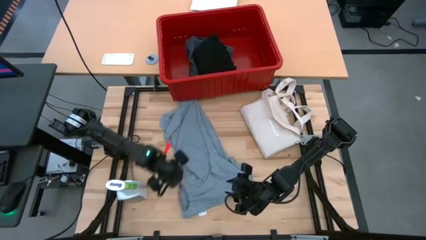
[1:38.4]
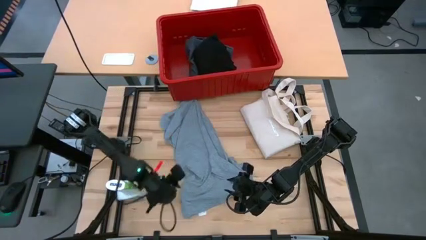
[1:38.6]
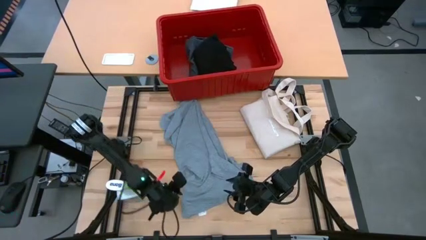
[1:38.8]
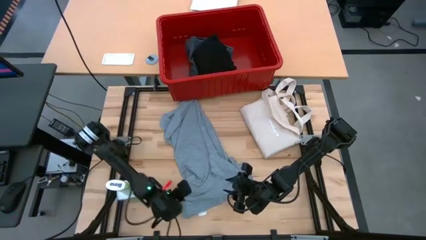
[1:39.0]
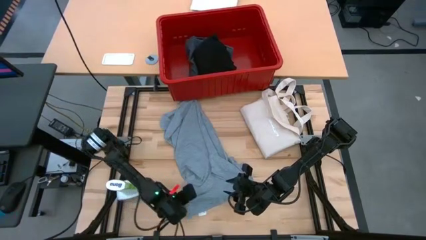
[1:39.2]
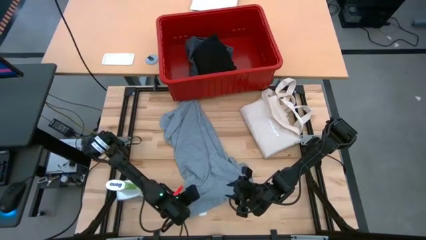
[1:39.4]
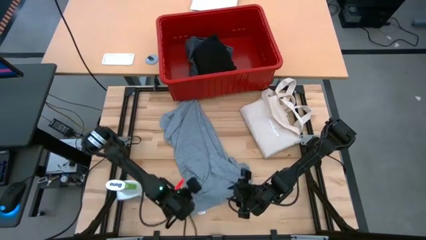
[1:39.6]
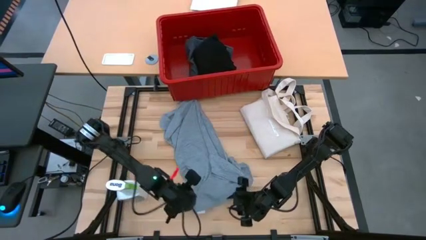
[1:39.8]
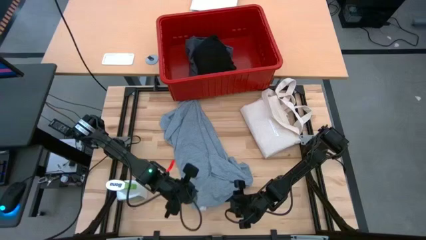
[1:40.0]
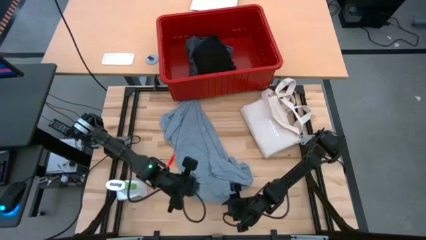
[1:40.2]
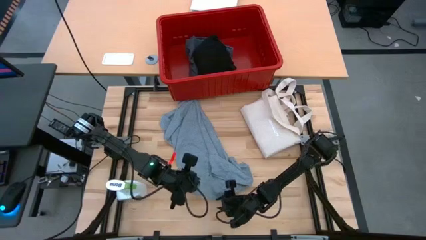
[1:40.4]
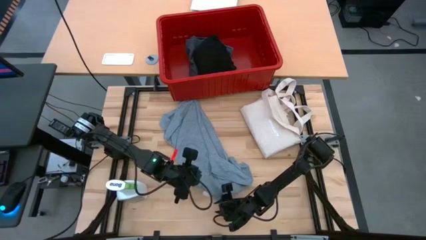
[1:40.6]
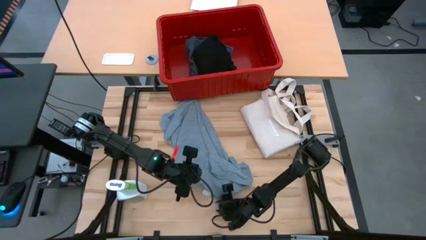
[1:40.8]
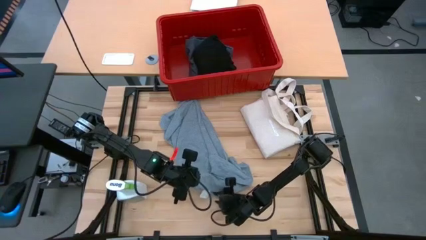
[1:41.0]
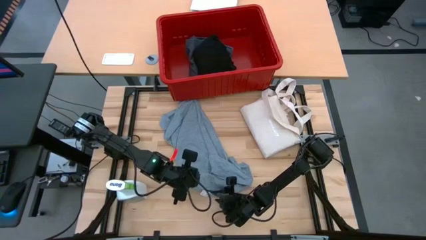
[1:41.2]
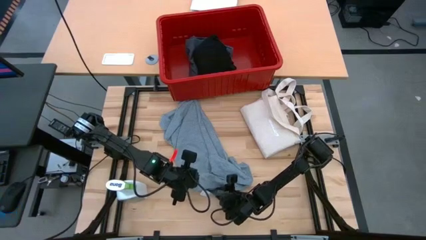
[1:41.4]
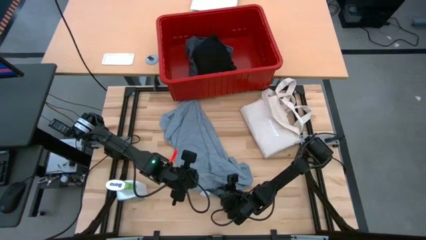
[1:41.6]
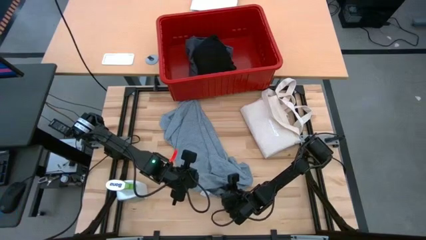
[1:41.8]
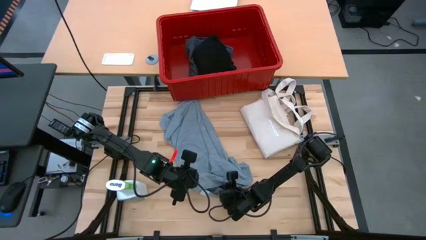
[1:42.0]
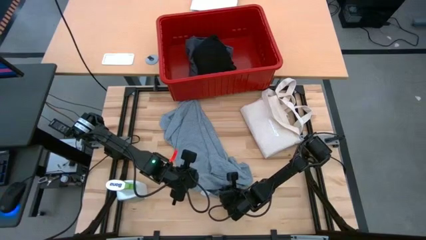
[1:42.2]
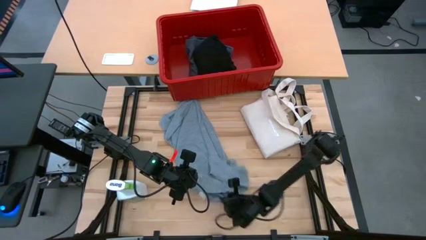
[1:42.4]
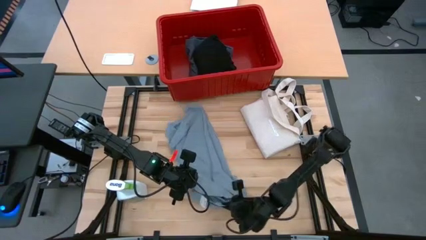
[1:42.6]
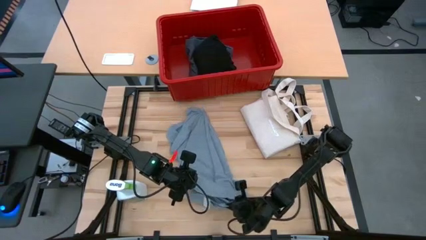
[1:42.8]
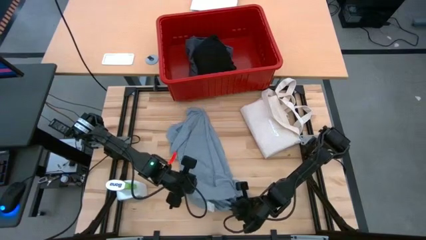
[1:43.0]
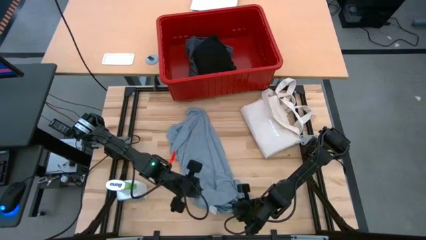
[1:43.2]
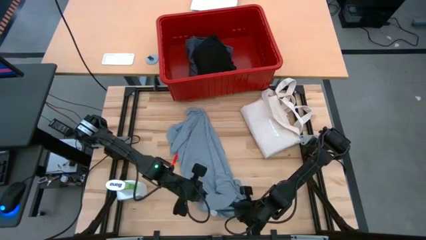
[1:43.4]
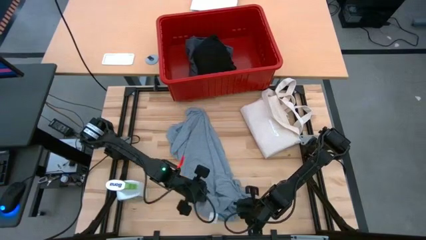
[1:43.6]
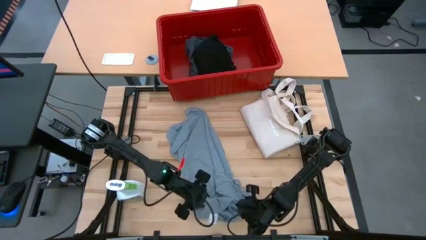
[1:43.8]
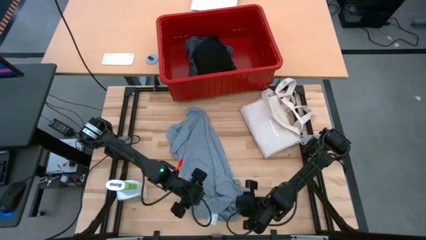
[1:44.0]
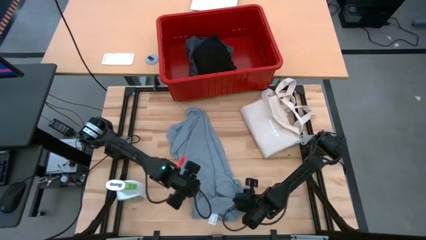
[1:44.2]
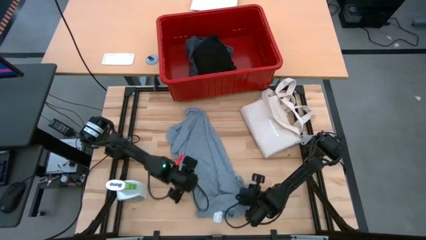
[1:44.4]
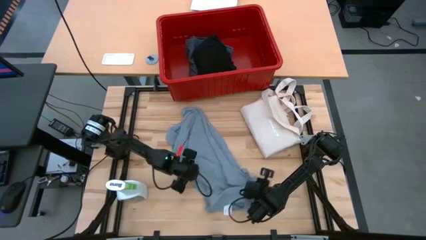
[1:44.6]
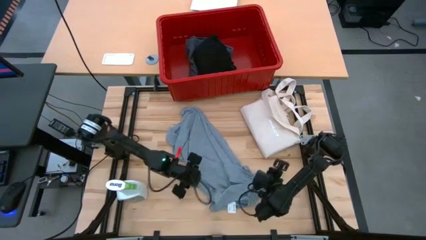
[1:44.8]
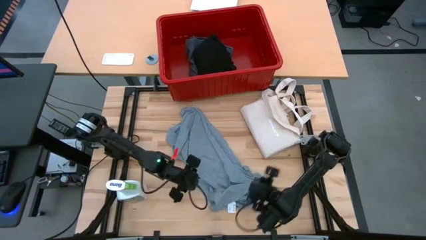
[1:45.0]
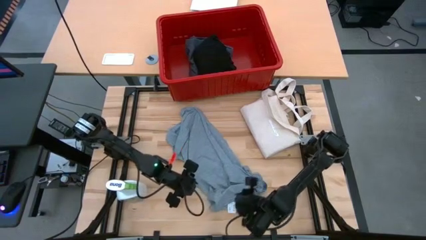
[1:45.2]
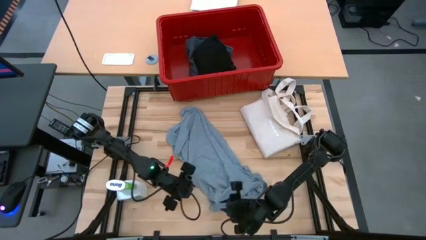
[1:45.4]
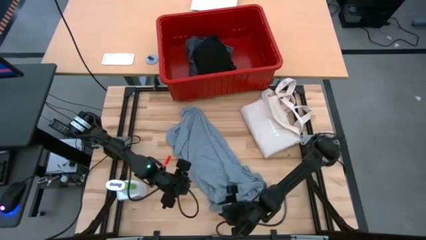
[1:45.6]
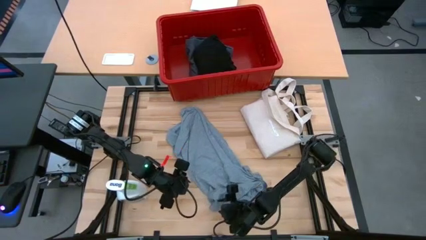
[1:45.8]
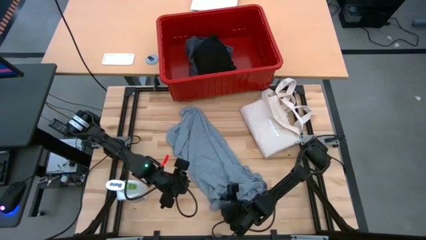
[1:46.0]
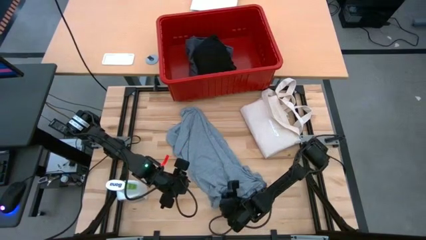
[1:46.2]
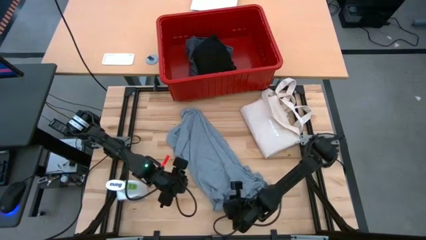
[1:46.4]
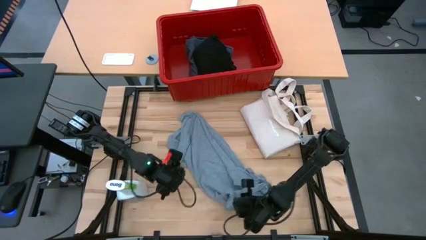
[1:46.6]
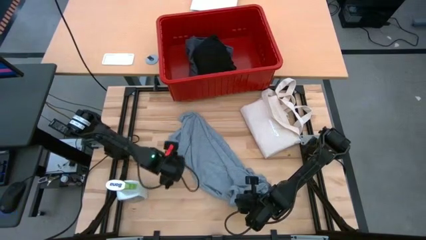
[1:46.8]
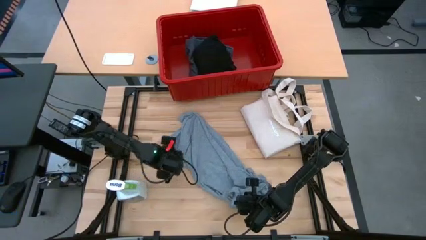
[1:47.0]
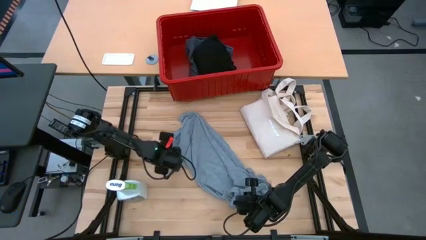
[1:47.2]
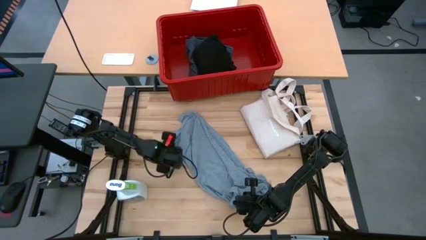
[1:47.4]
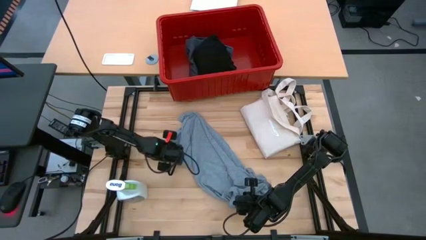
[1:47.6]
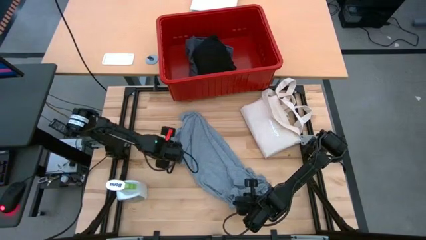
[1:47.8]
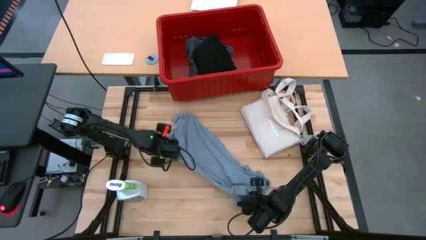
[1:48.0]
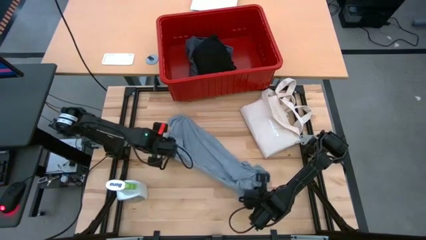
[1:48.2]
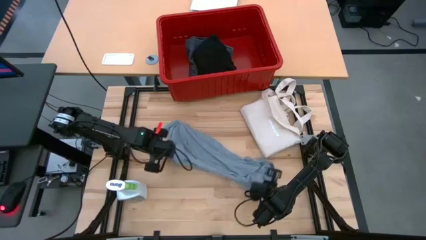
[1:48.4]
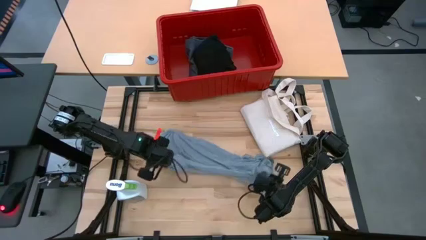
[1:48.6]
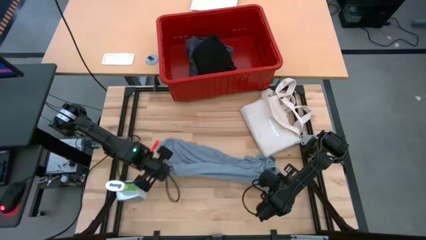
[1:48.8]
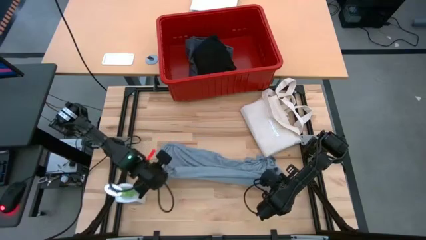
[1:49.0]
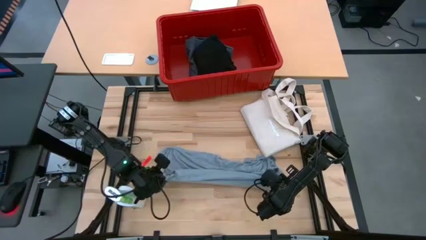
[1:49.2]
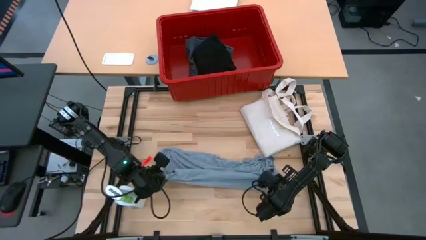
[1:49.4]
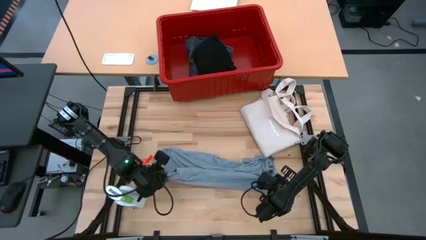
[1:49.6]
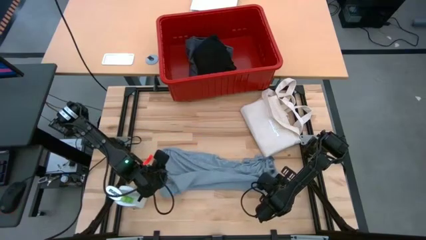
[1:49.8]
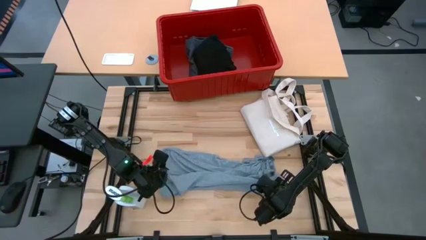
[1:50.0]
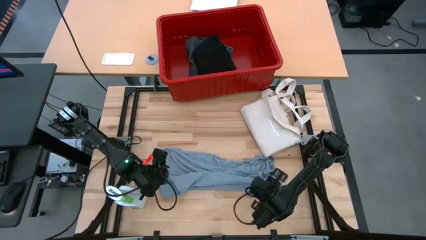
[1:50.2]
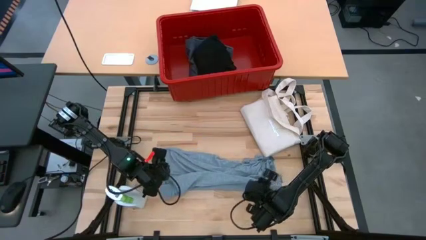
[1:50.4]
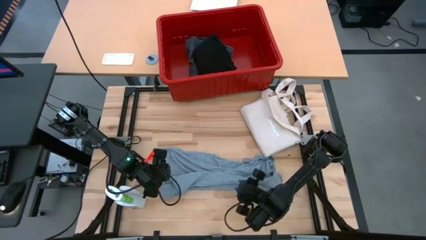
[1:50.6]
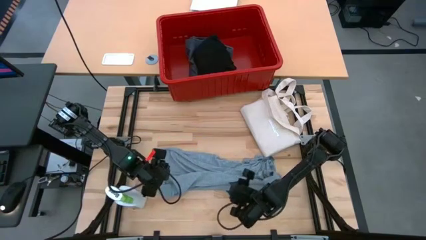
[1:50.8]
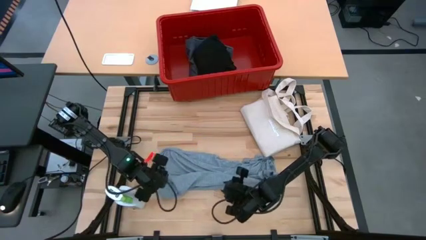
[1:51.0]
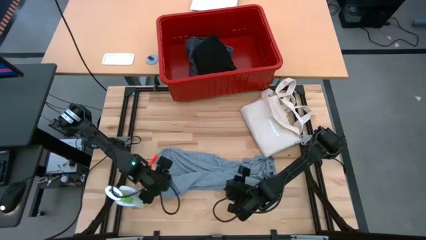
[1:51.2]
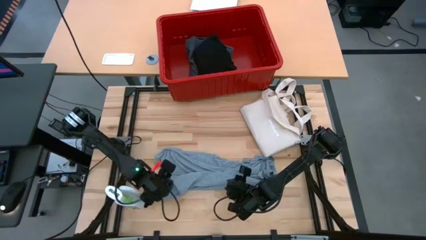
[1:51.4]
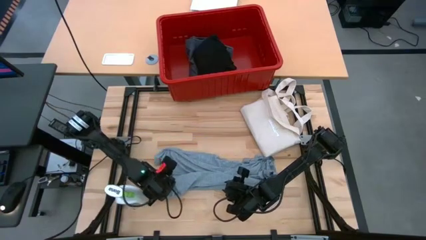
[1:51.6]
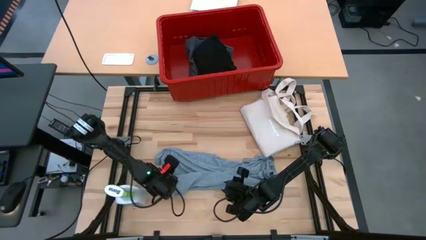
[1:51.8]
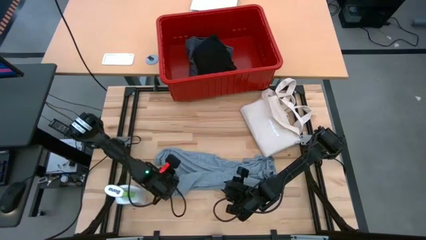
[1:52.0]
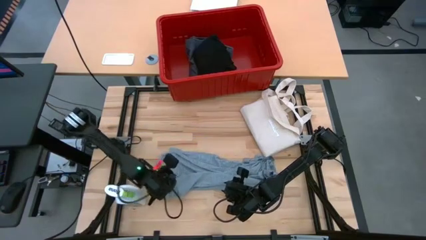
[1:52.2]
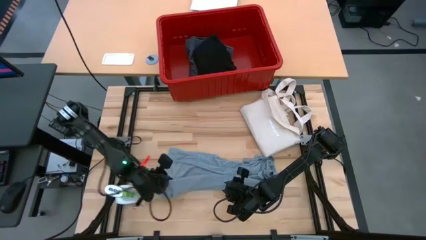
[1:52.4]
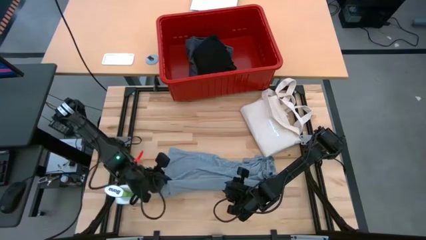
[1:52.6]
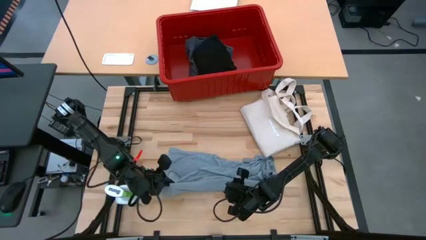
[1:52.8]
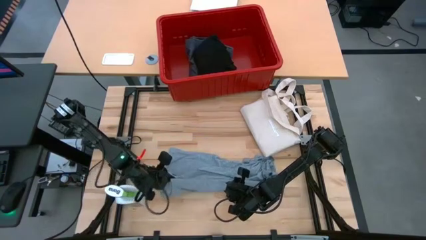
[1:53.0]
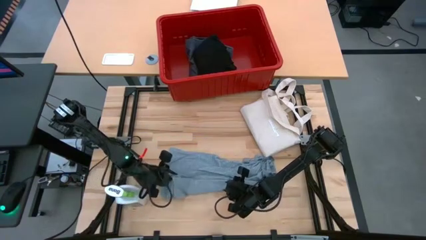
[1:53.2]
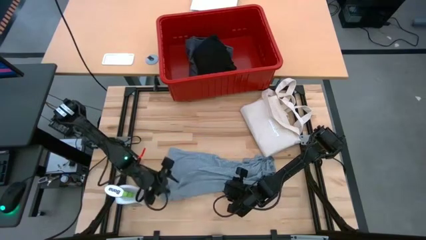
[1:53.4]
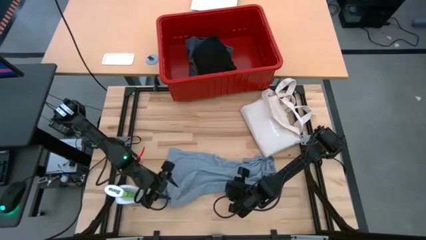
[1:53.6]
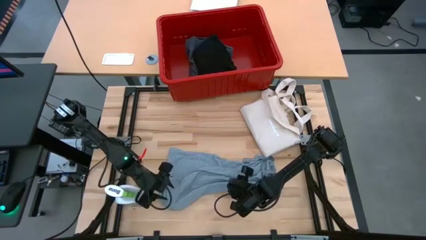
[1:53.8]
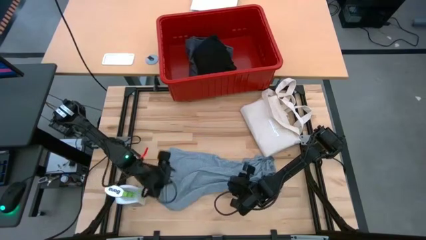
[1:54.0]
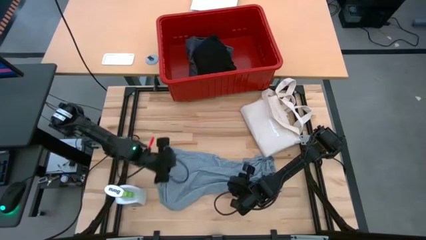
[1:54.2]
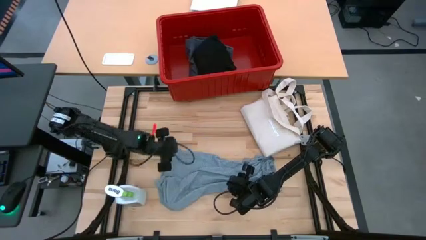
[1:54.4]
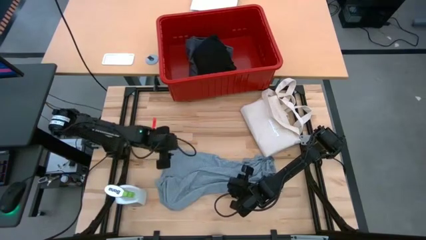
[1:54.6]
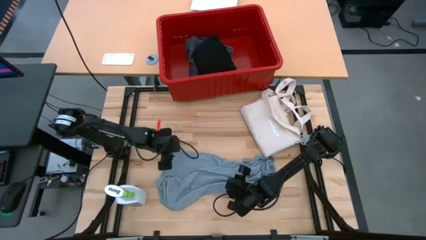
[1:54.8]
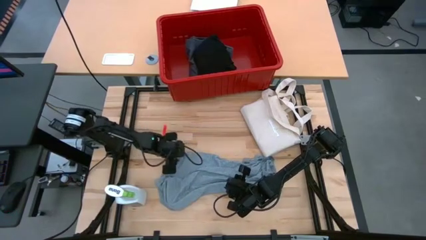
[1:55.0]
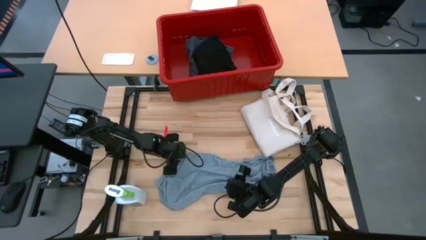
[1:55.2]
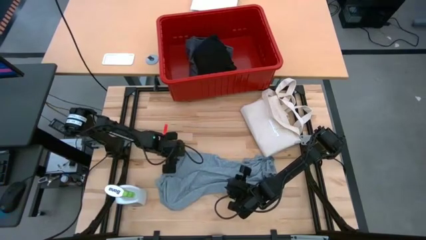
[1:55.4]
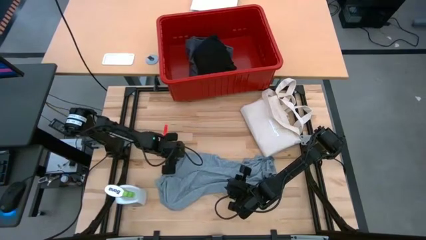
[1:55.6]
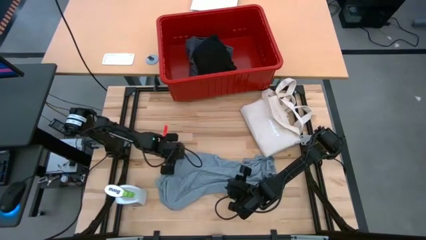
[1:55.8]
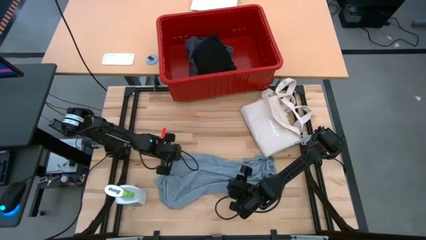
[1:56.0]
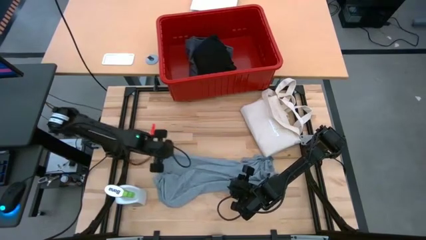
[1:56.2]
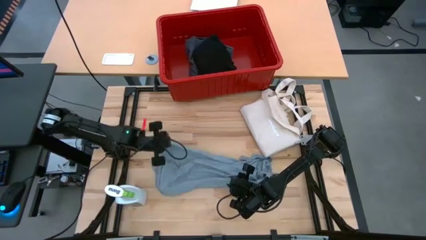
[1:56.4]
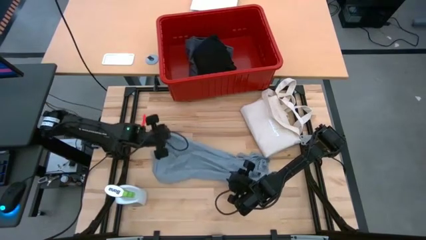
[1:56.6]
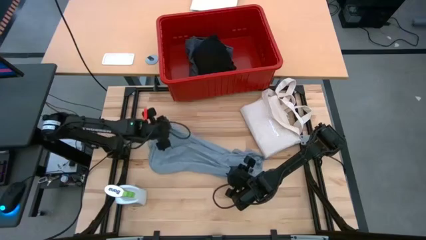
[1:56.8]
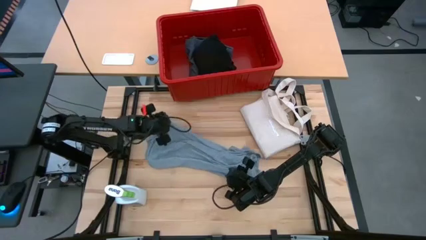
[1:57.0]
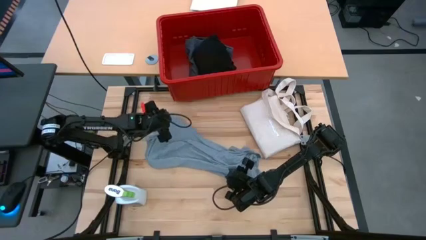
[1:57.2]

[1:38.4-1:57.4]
Task: Fold Laundry from Bin
Fold the gray shirt
